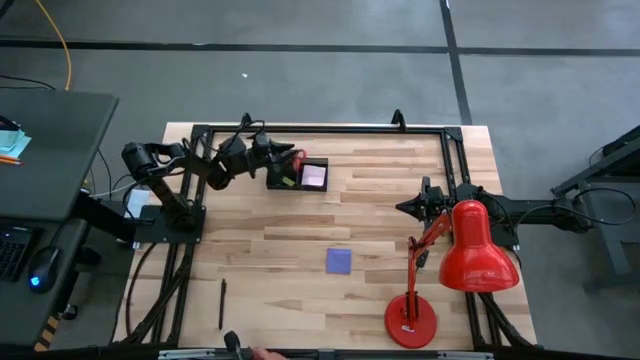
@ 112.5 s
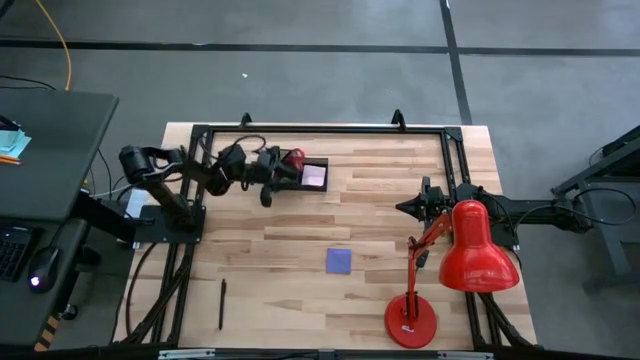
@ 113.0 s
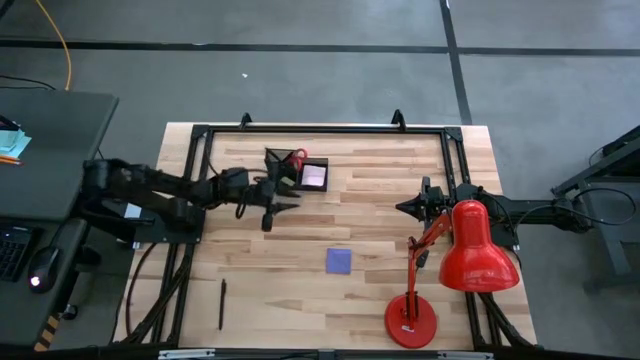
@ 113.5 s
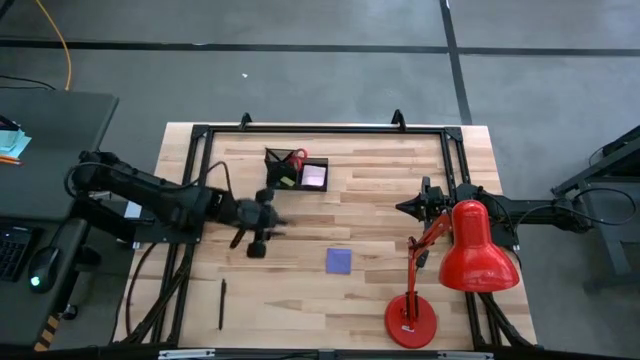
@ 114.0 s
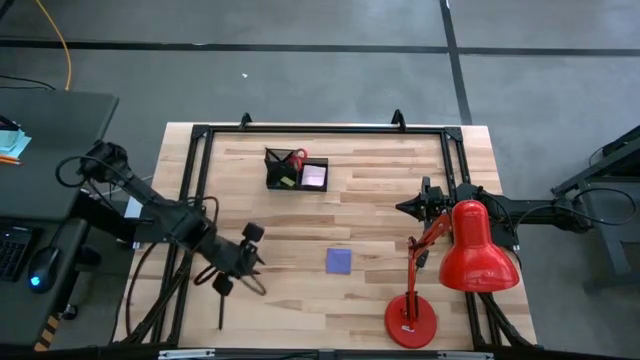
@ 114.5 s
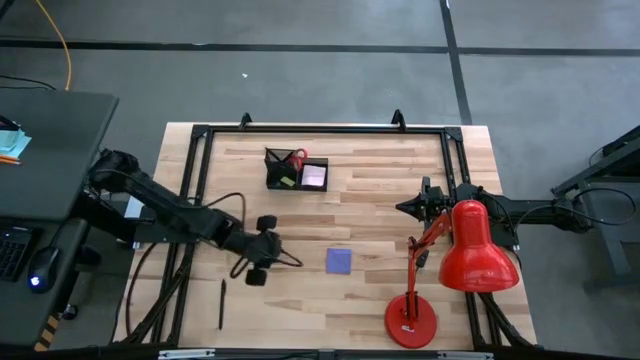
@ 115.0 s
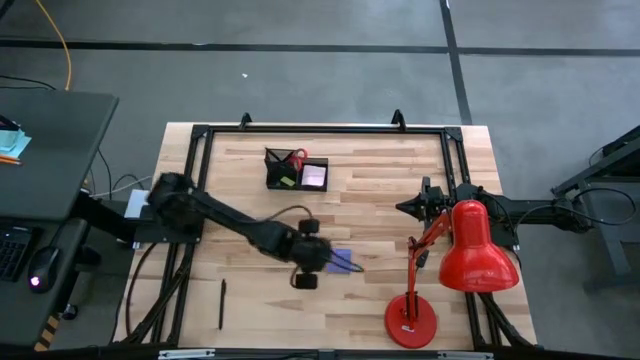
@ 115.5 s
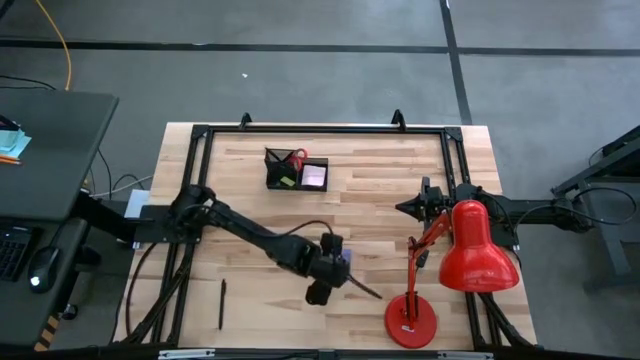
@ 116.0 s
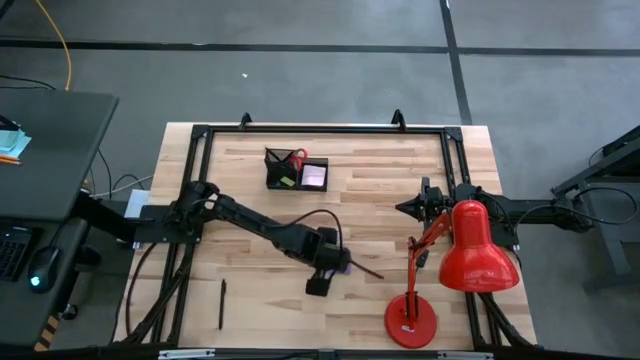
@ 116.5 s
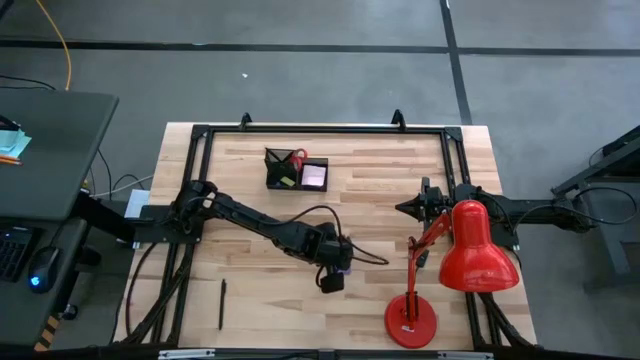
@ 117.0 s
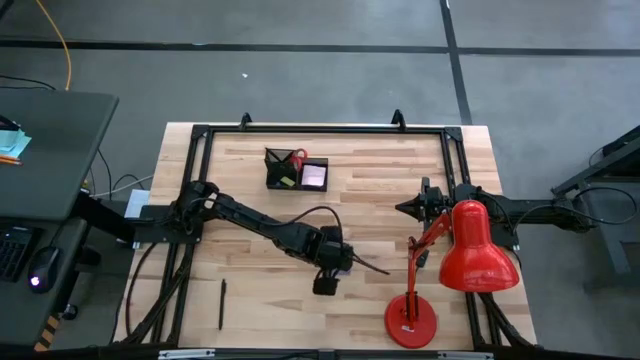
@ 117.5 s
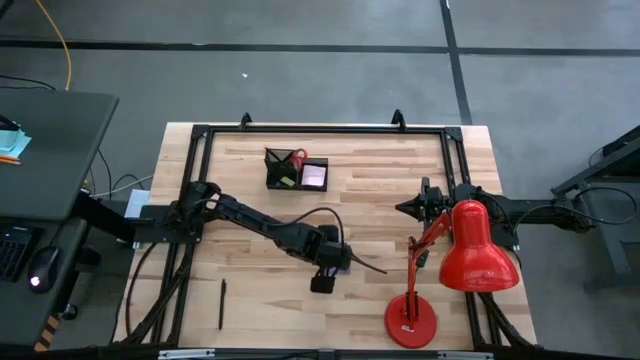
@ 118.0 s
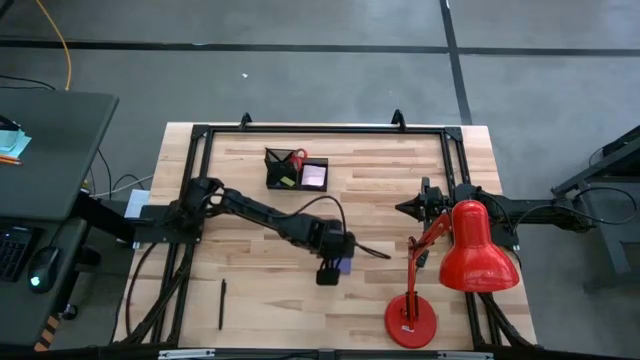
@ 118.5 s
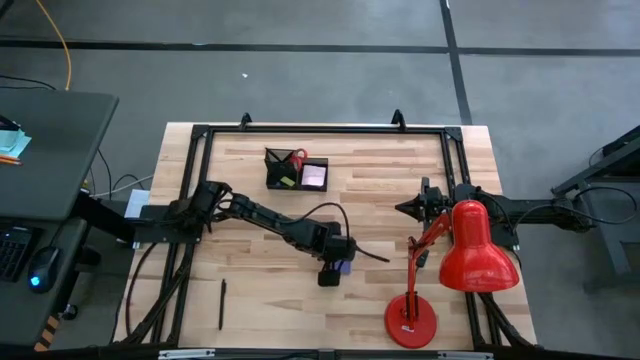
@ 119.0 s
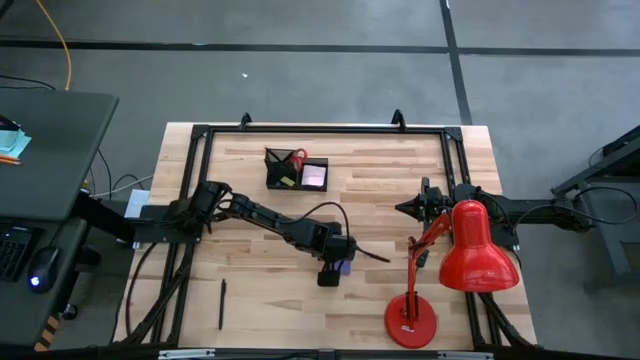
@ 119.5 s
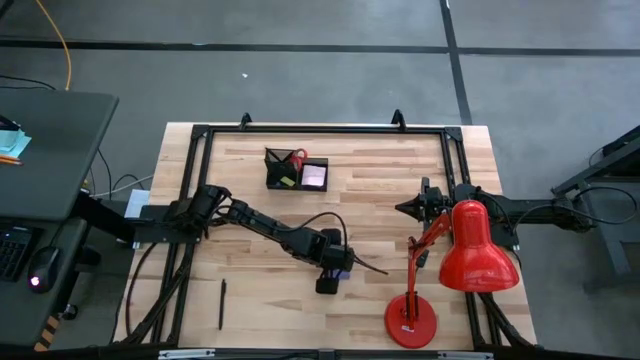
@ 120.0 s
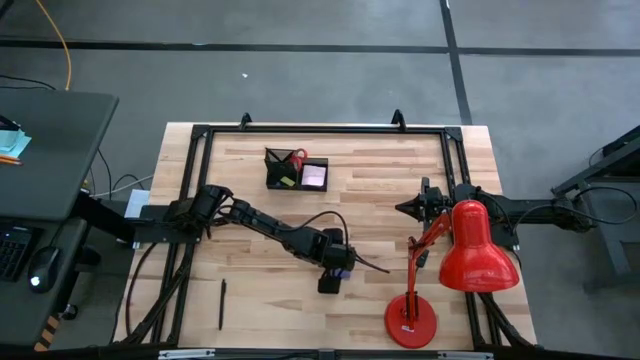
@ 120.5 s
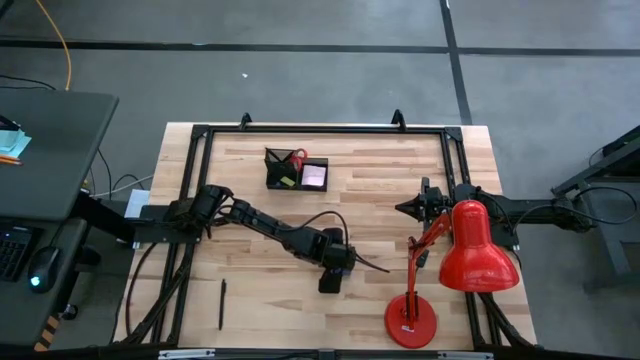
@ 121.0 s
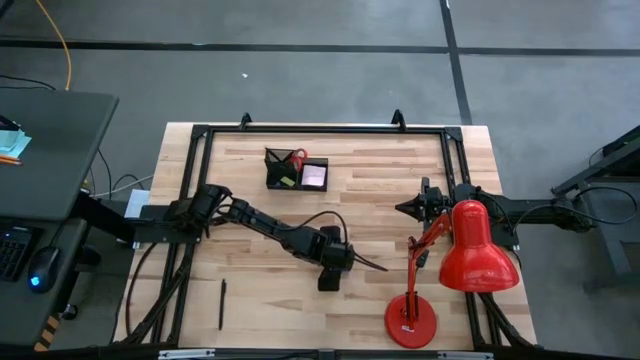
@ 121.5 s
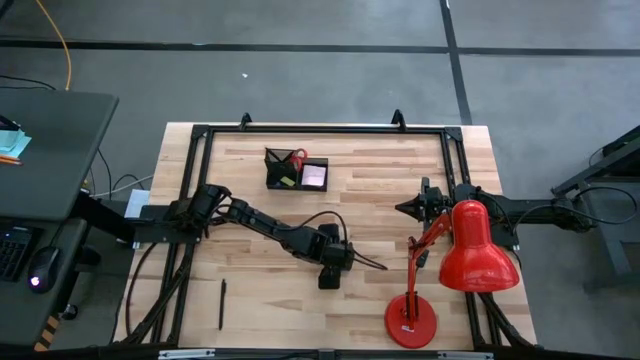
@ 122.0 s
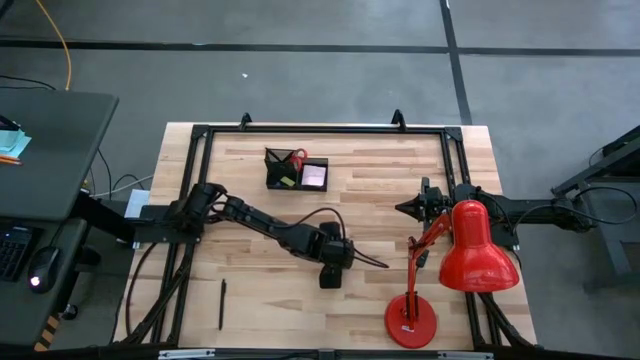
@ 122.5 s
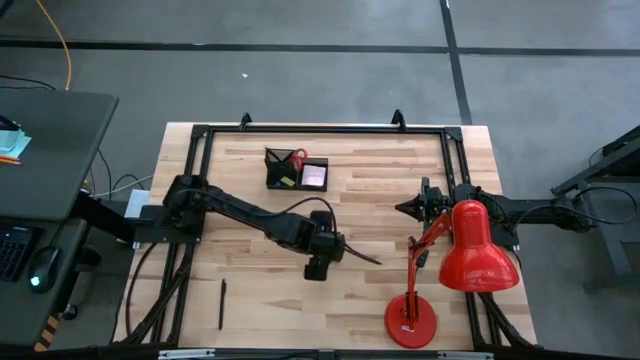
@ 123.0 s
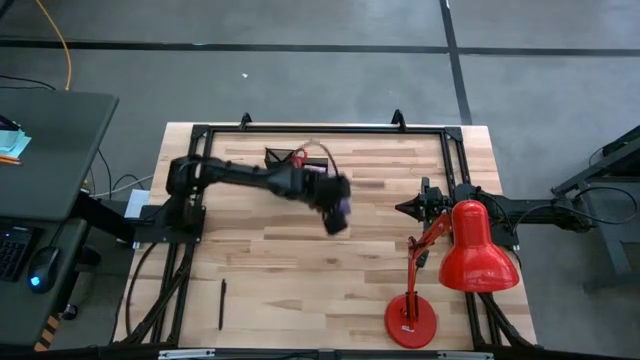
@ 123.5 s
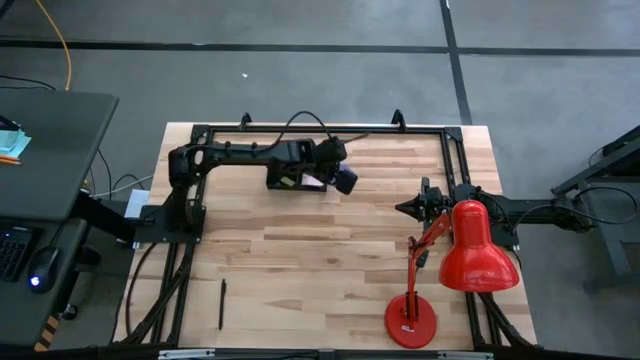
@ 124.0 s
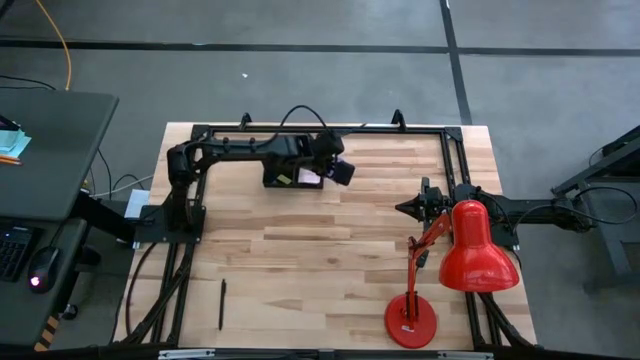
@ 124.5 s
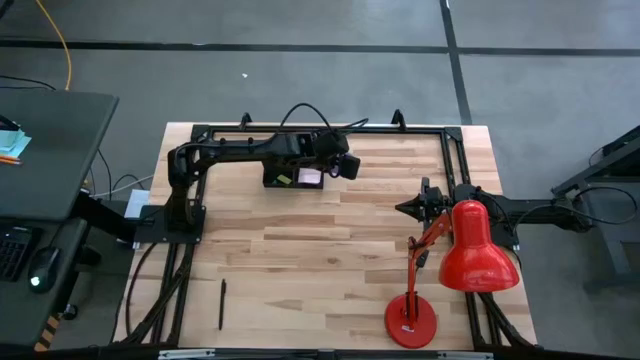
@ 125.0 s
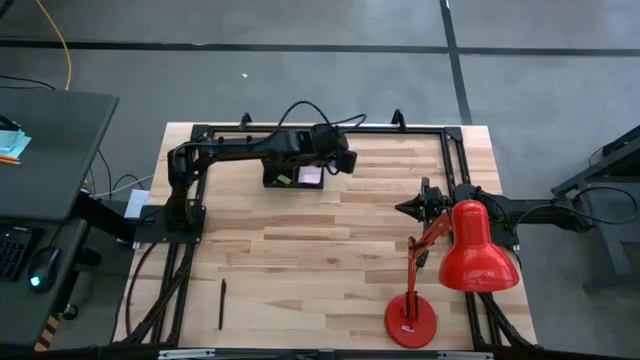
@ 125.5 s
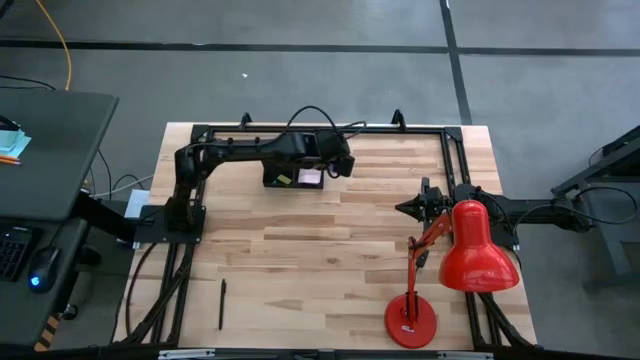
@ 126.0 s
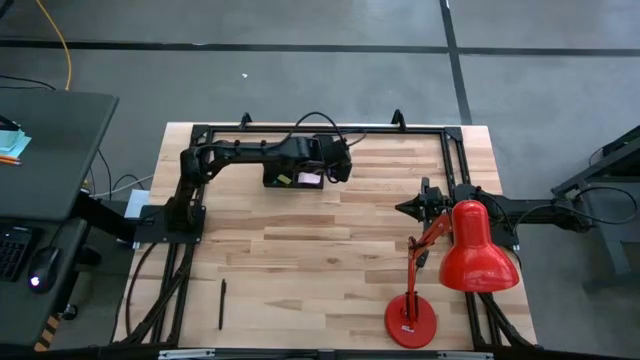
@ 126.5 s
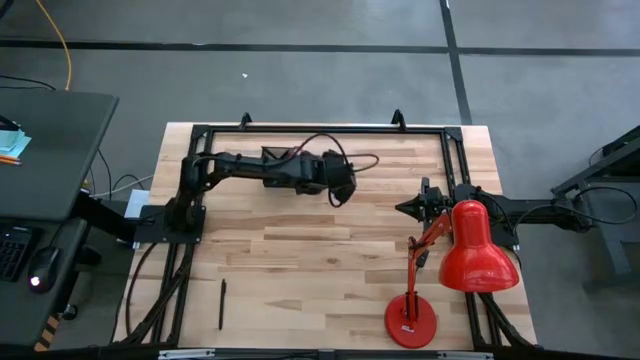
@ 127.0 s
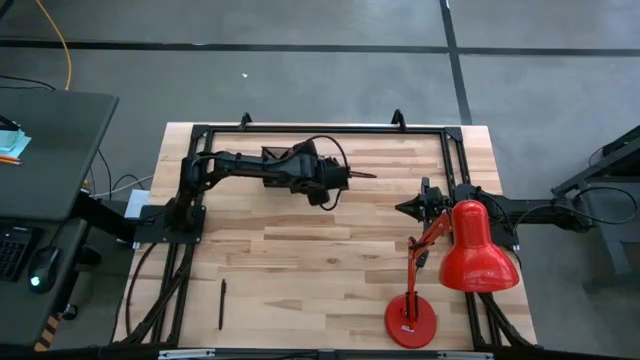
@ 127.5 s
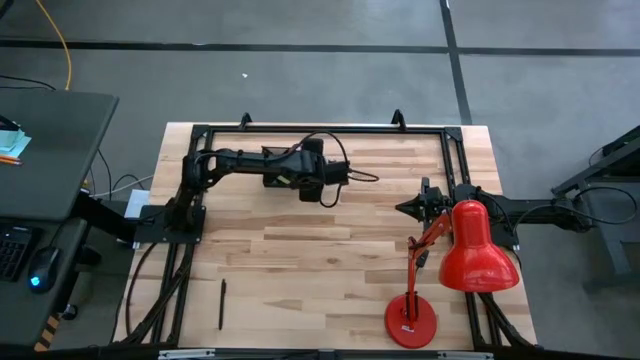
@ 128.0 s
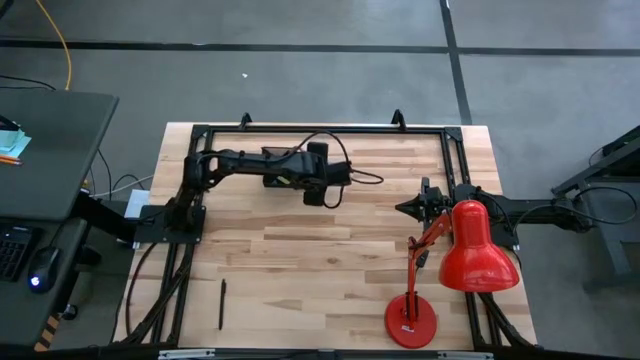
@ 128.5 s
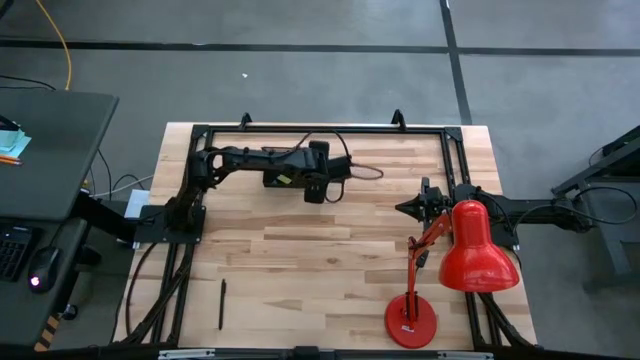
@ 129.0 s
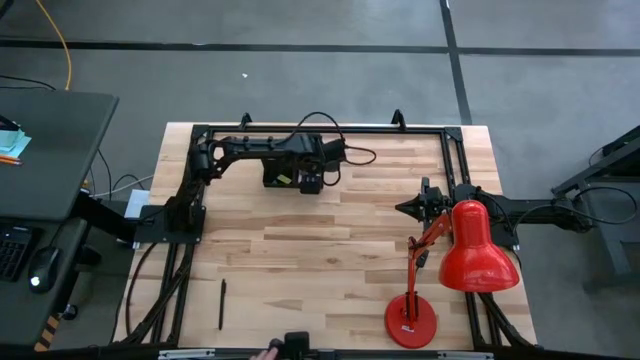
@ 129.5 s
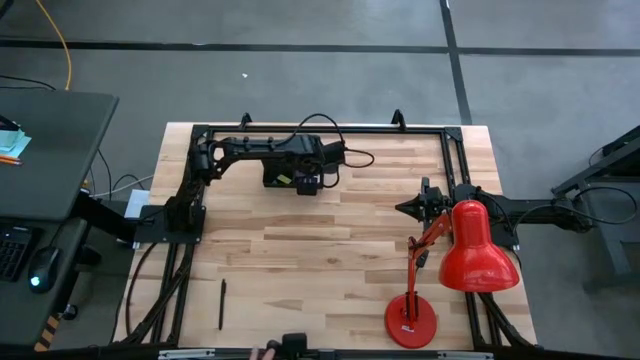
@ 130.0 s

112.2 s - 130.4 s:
Task: Pick and place office supplies into organizer
Put the blue sticky notes into the black desk organizer

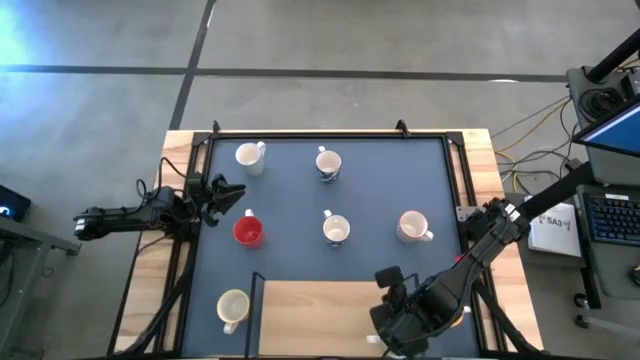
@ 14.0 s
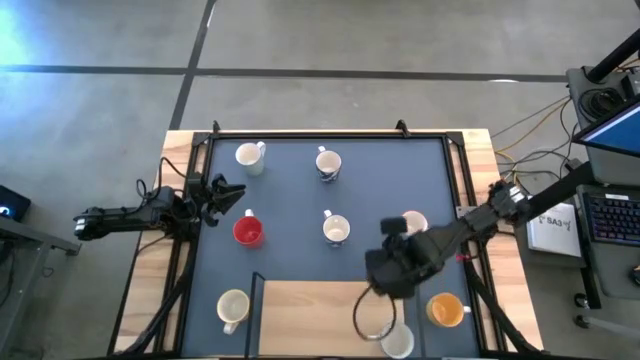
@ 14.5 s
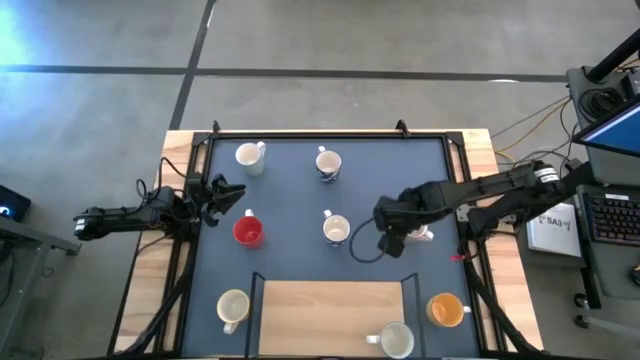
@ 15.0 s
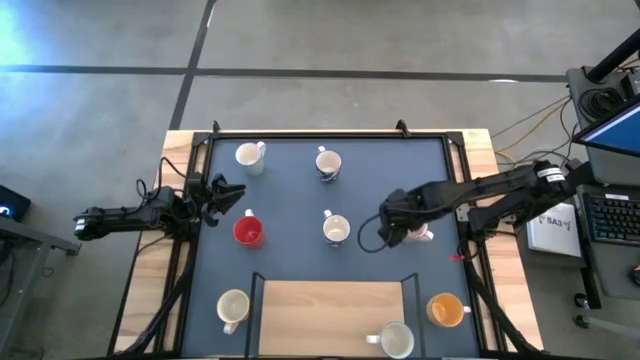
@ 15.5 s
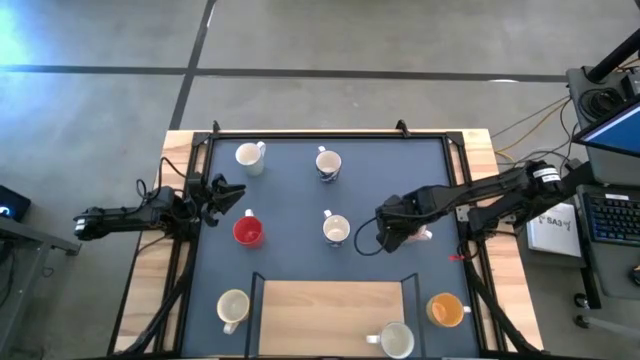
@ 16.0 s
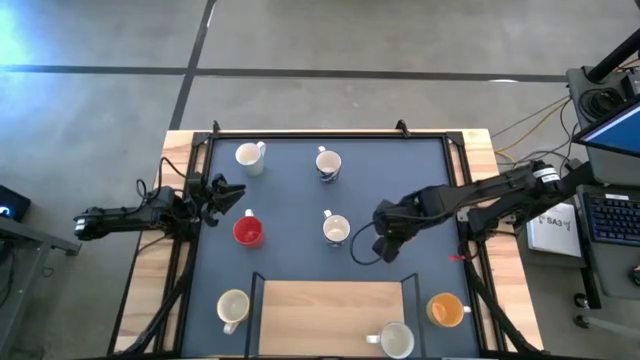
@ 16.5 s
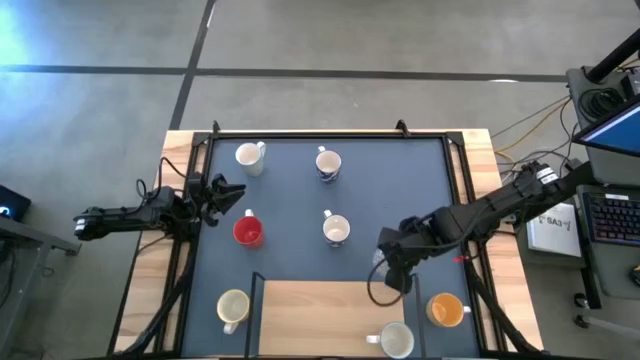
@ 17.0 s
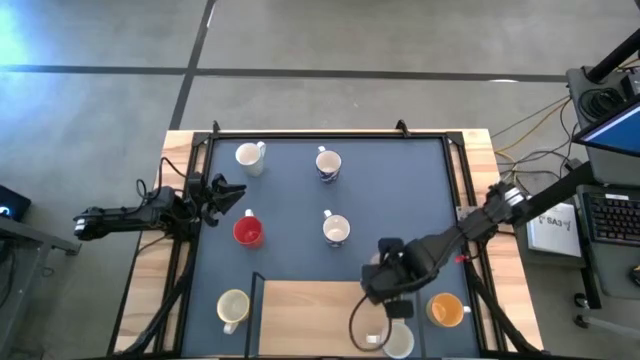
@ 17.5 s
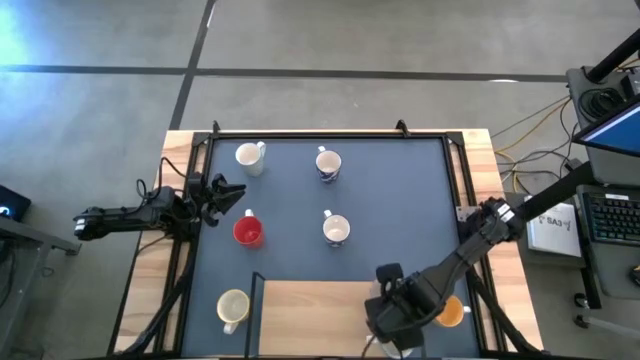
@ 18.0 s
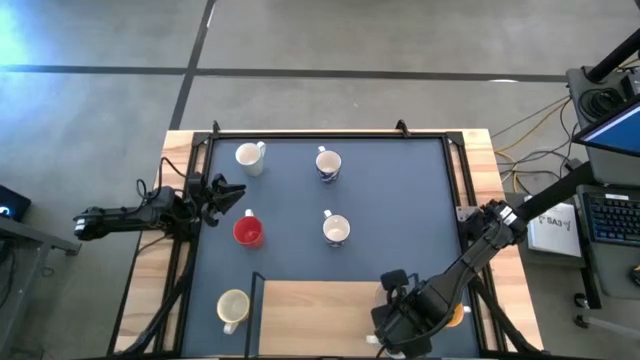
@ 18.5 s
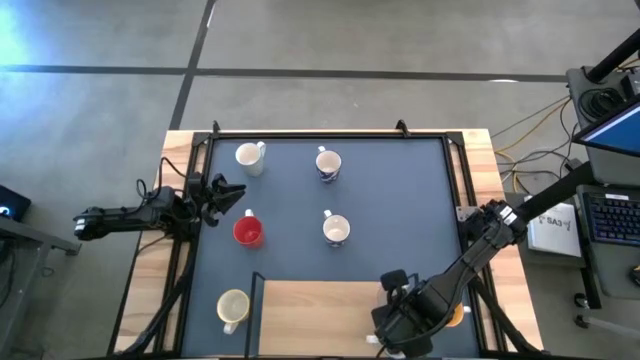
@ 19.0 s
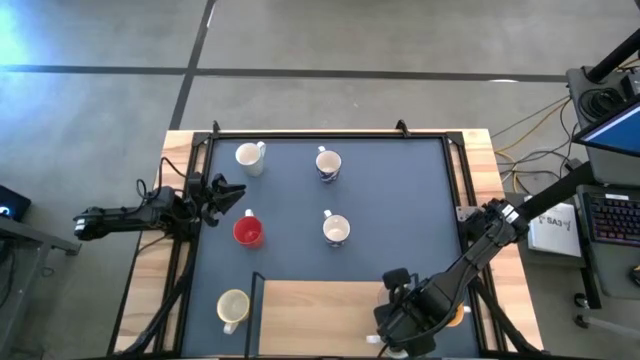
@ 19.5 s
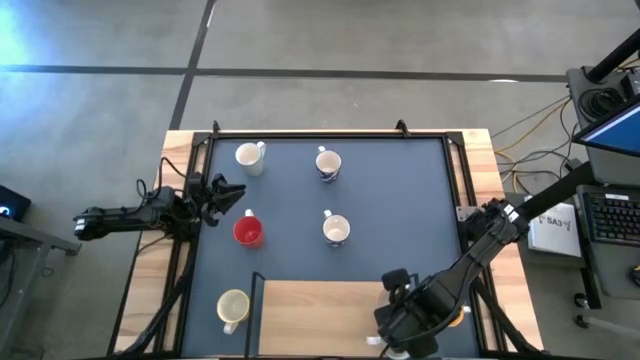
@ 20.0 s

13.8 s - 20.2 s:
Task: Place coffee mugs
Put the grey patterned mug on the shelf
